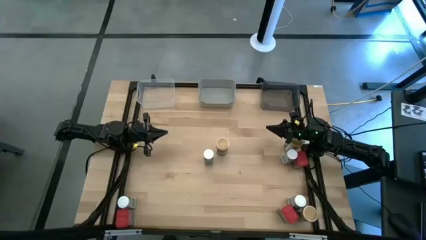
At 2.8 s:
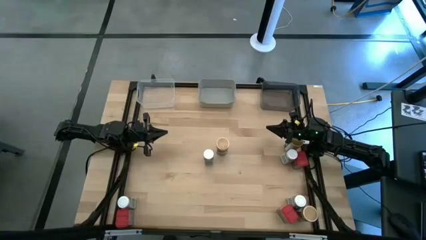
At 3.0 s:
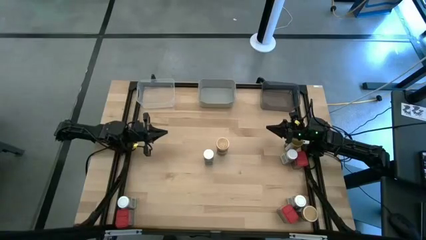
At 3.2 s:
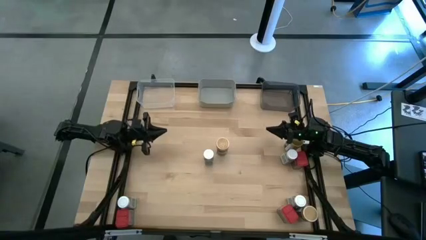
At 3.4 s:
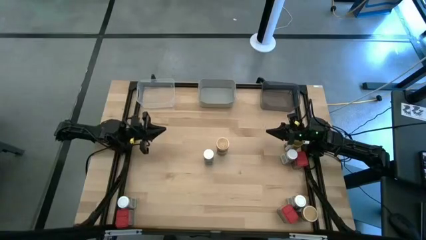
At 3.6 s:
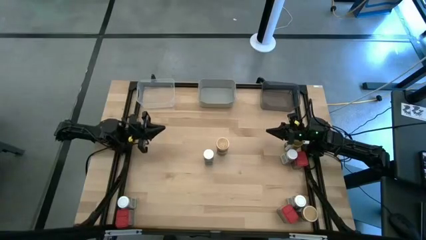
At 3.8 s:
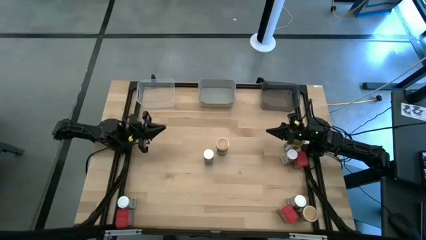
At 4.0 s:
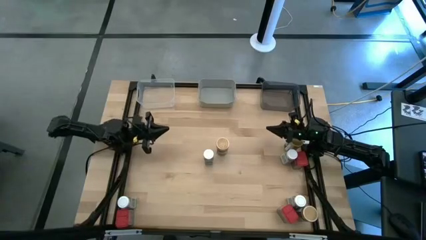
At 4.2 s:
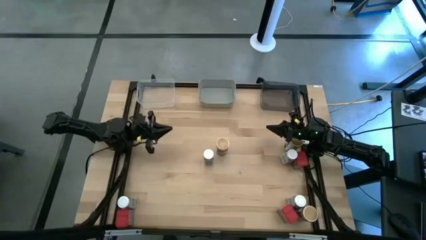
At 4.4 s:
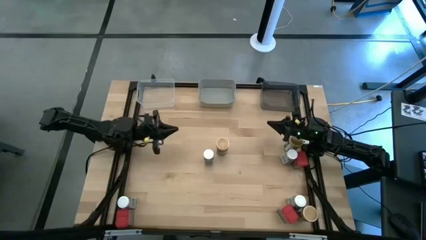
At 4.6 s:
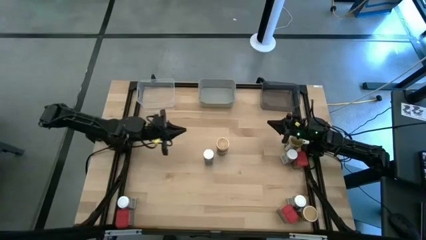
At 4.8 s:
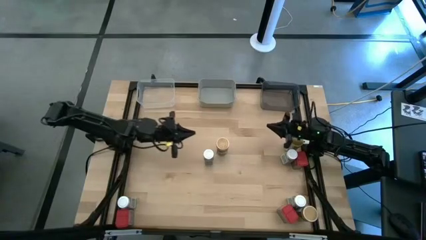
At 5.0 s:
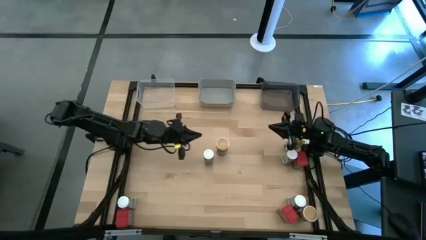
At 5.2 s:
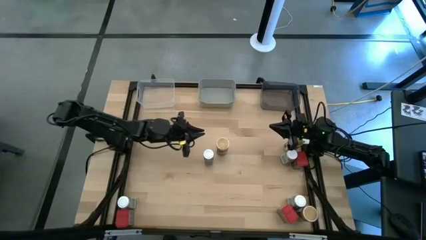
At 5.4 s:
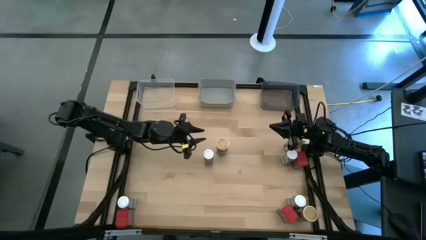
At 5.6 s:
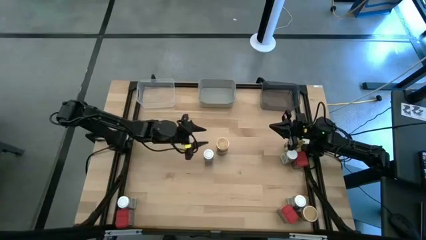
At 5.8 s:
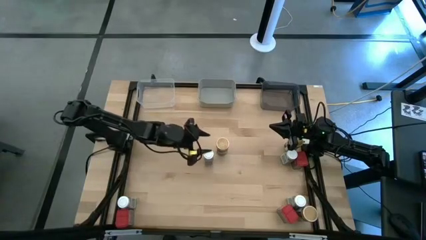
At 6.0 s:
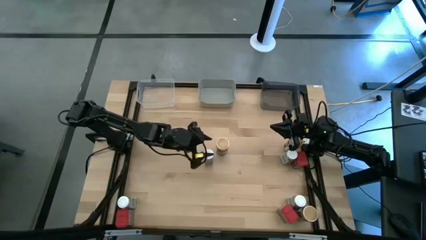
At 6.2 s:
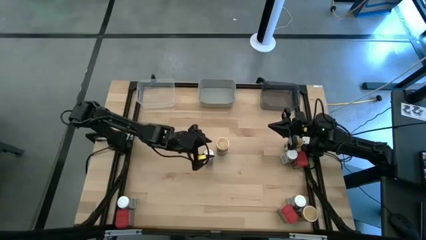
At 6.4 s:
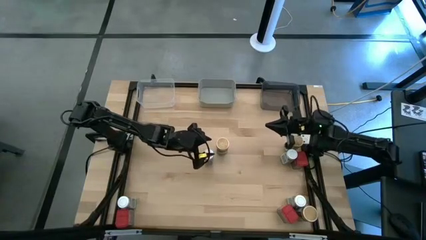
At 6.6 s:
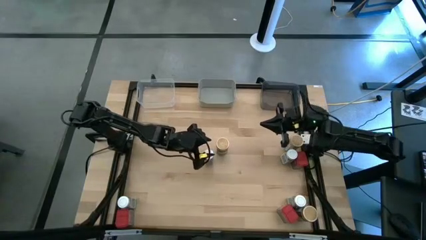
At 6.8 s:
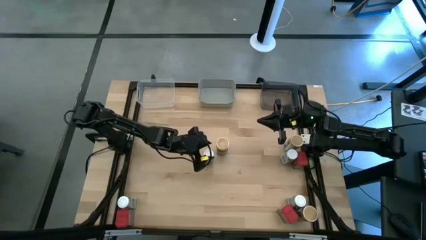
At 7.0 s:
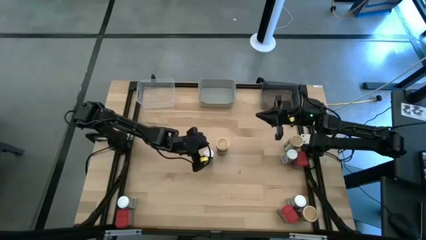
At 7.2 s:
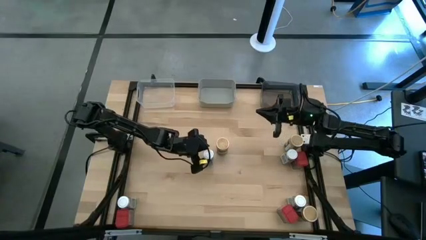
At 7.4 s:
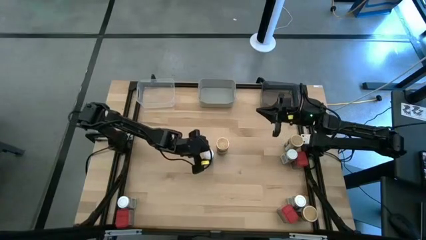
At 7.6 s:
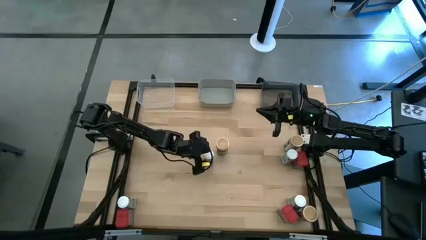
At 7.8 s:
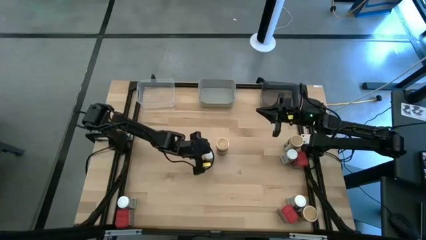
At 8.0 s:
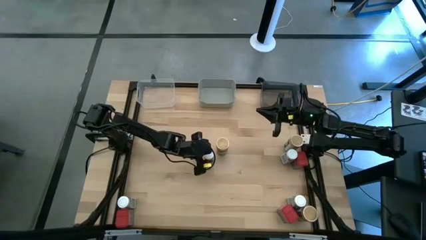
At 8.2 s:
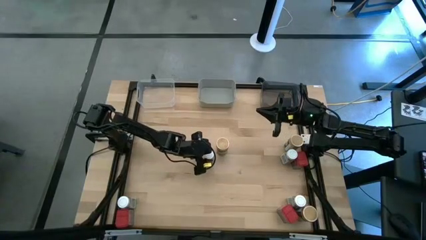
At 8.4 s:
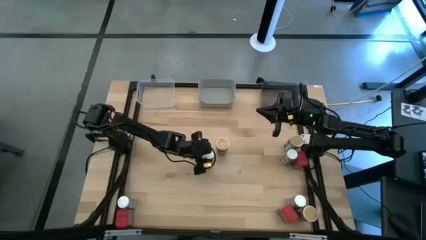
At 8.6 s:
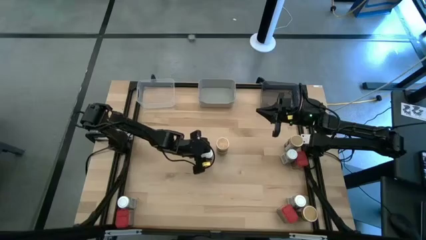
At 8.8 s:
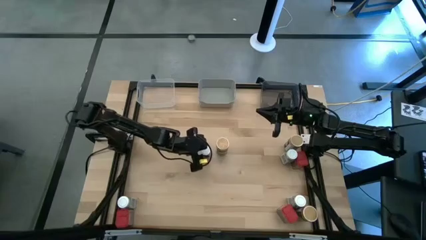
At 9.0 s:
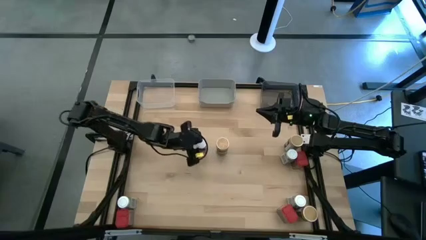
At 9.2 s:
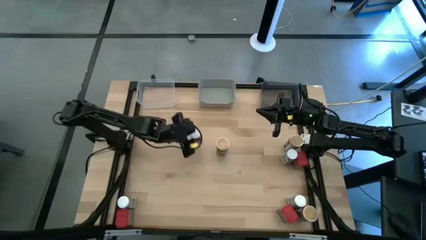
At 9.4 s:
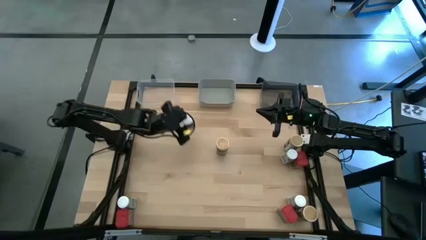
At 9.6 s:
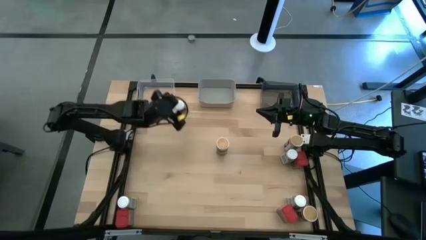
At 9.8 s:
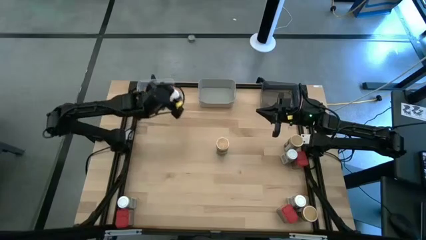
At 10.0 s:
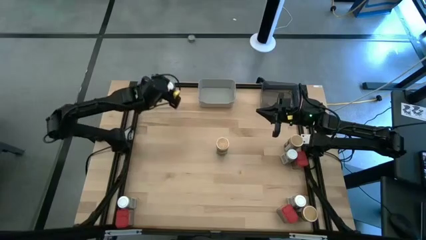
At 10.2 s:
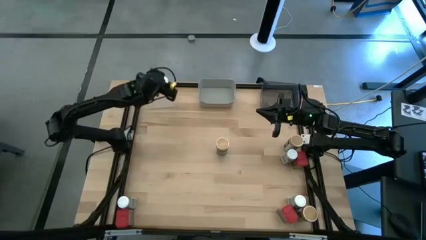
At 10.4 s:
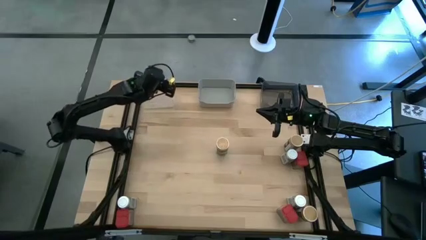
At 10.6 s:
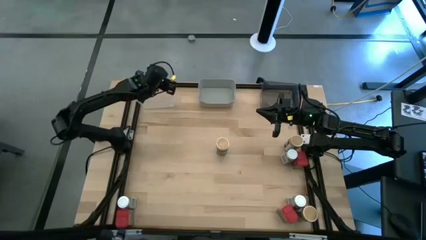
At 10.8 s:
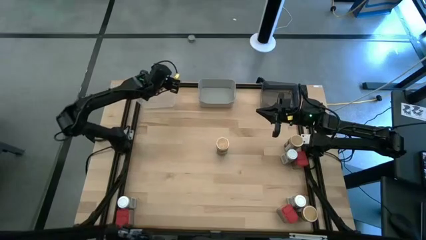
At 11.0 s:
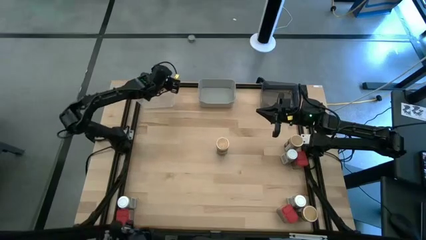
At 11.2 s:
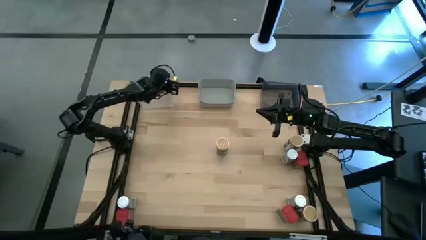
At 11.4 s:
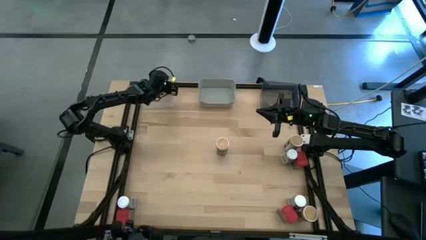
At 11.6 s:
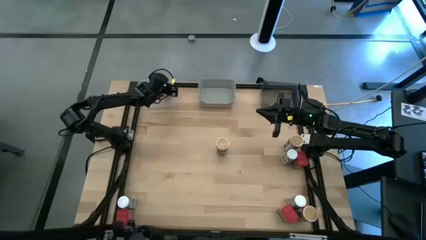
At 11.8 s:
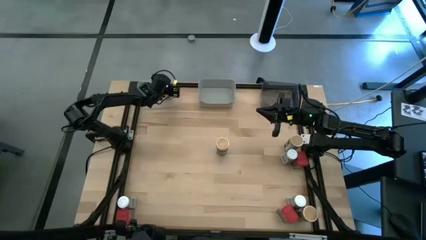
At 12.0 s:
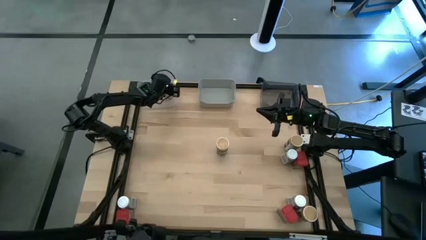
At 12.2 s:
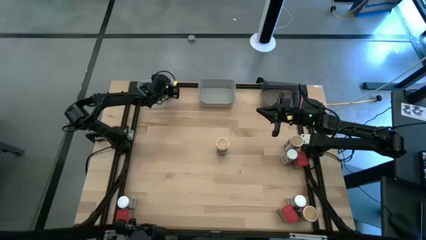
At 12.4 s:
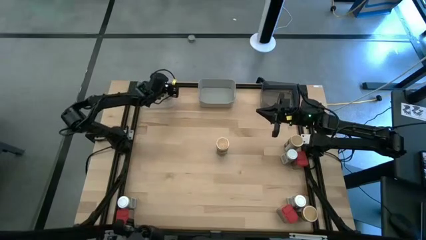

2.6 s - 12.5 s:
Task: Sort spices by type
Put the white seasoning bottle into the transparent bin

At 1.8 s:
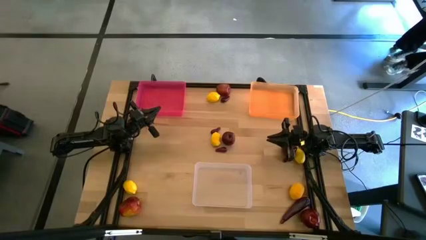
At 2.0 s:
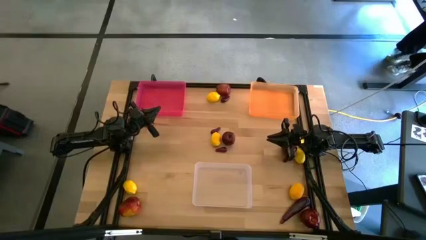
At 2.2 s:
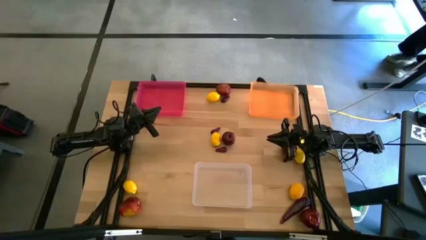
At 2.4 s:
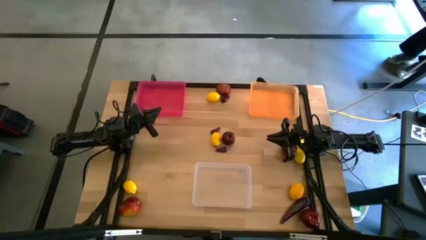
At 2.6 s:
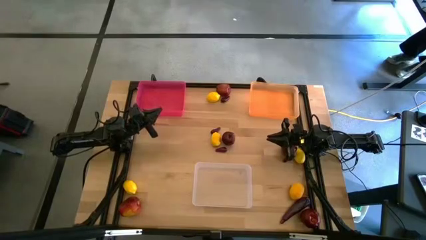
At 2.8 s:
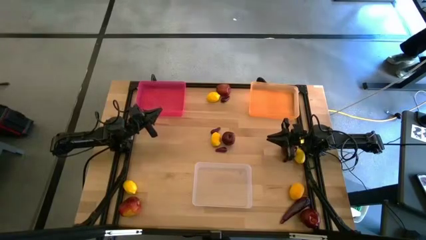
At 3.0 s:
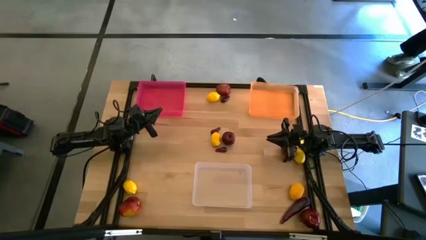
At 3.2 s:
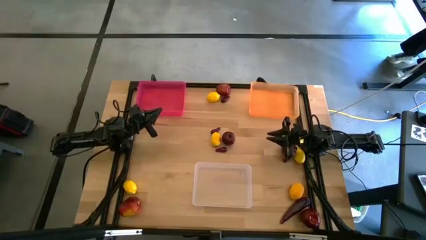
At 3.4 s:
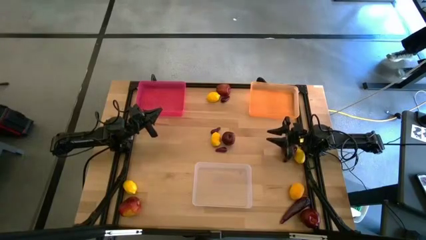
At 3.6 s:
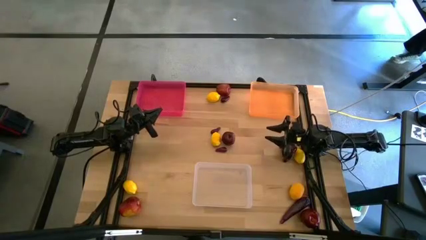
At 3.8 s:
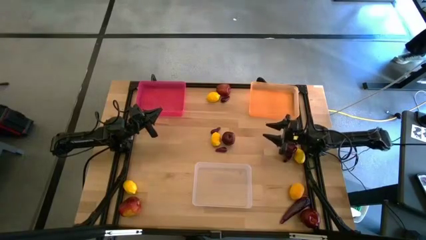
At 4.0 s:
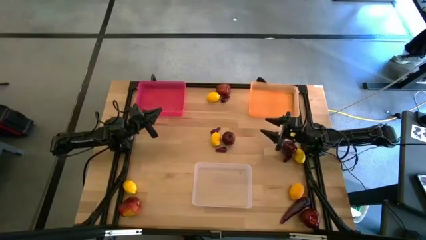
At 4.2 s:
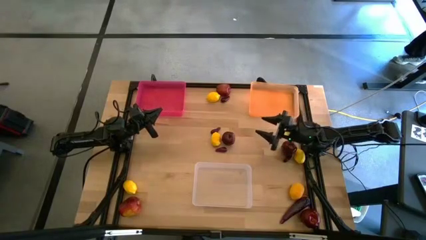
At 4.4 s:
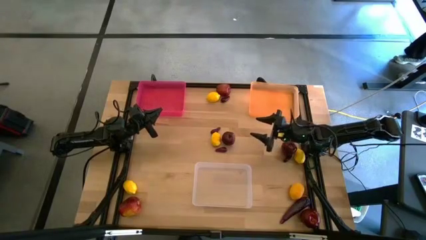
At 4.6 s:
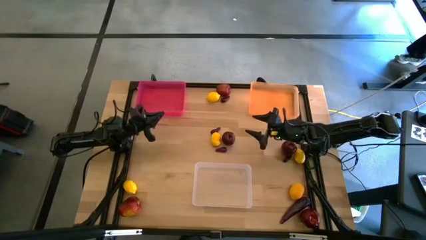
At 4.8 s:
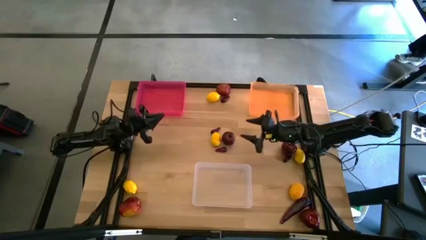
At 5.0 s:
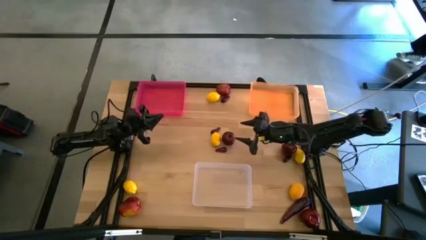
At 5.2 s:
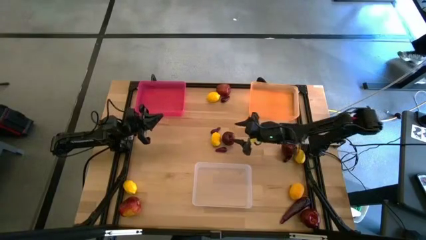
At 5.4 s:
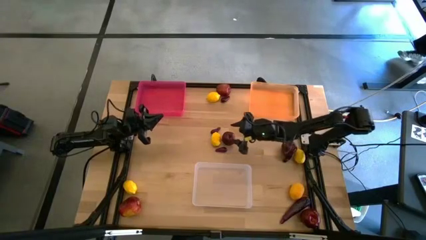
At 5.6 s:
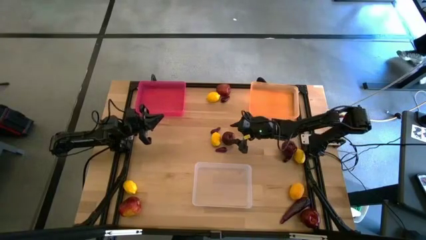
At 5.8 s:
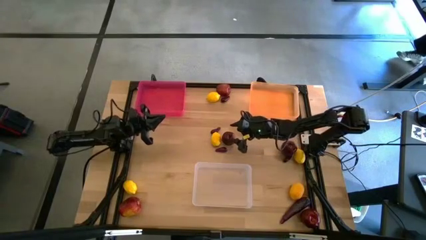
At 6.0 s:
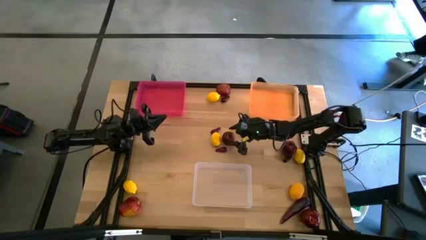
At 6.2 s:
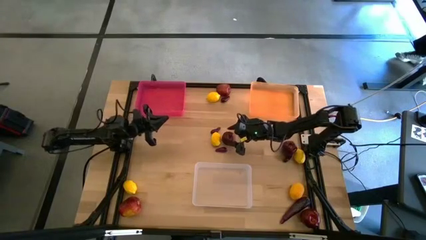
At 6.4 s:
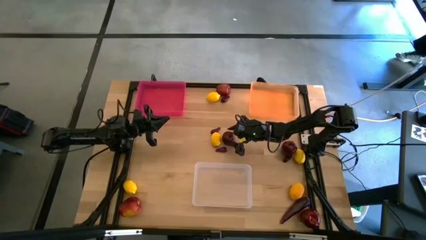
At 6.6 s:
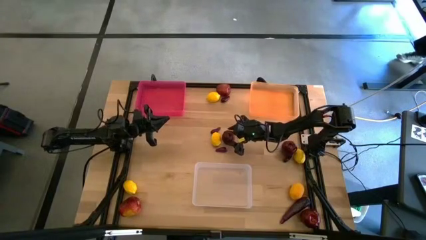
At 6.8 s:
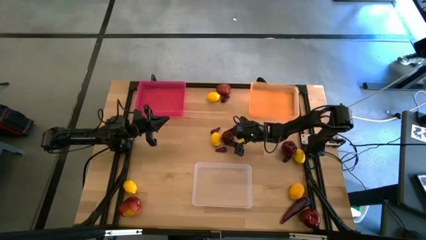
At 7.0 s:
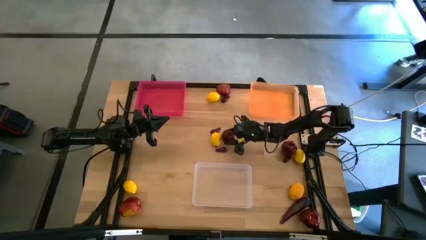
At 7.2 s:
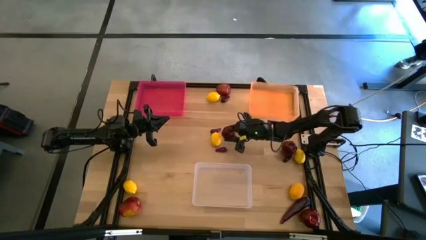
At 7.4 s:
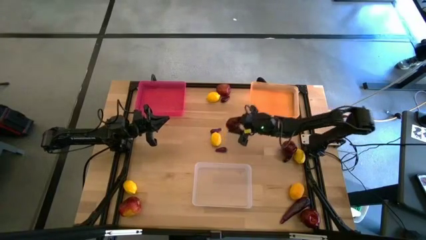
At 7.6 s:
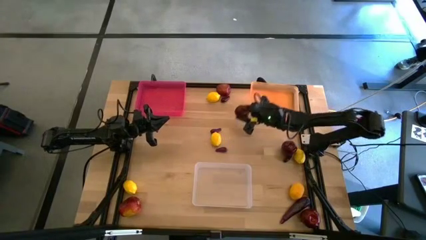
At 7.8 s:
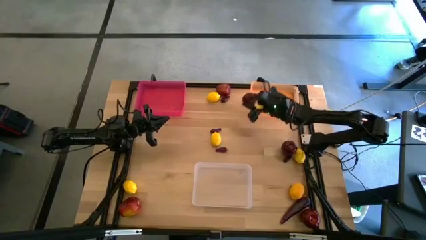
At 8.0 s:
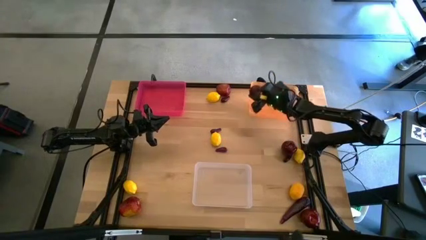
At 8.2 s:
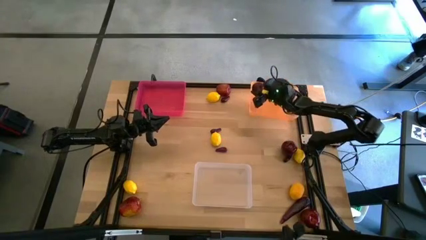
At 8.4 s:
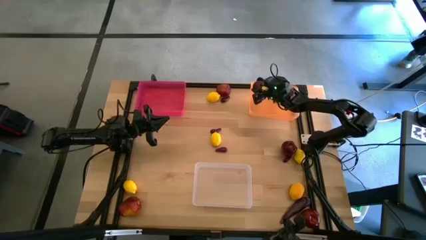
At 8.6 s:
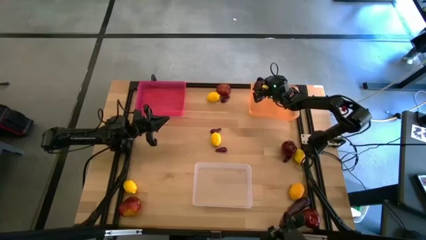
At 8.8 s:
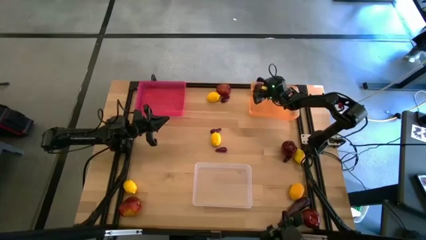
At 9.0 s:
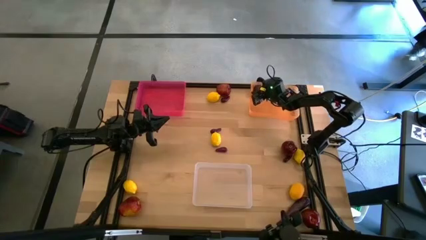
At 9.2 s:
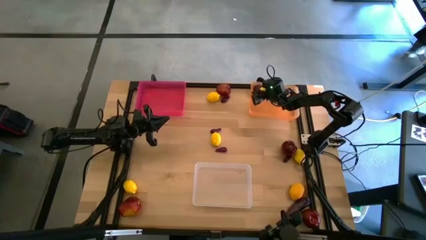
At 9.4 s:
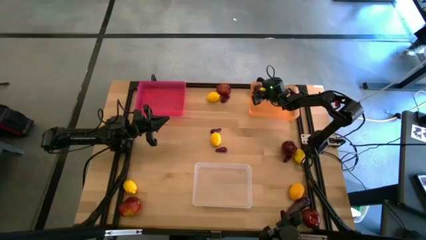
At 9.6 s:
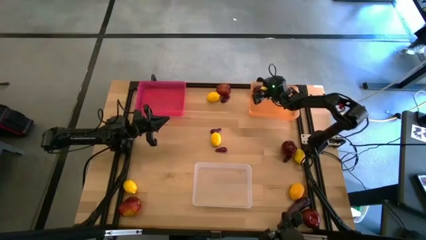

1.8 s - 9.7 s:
Task: Sort produce into baskets
Put the apple into the orange bin
